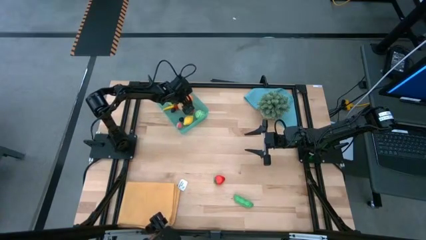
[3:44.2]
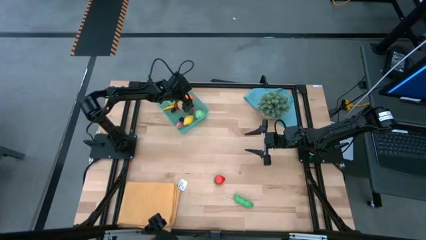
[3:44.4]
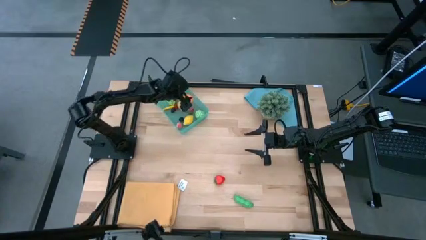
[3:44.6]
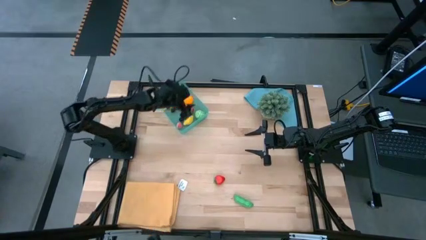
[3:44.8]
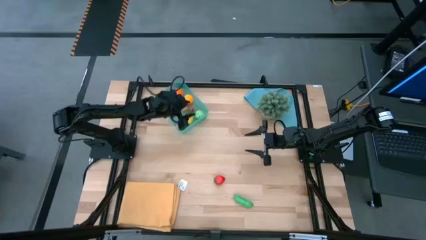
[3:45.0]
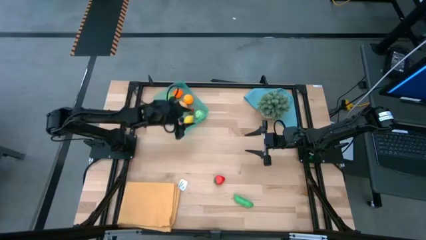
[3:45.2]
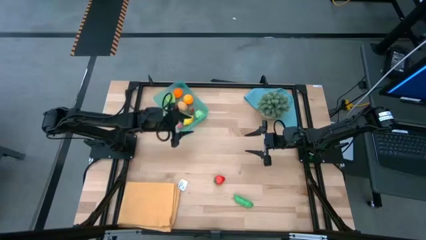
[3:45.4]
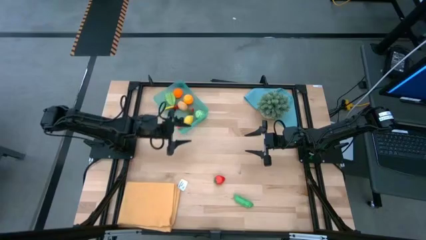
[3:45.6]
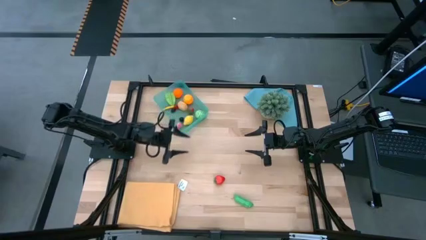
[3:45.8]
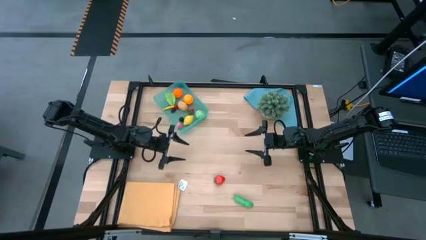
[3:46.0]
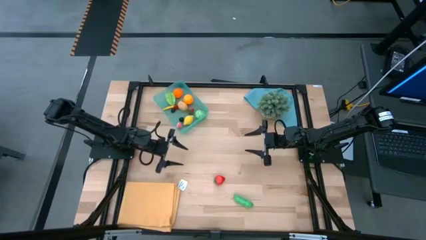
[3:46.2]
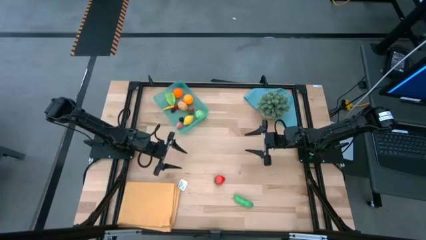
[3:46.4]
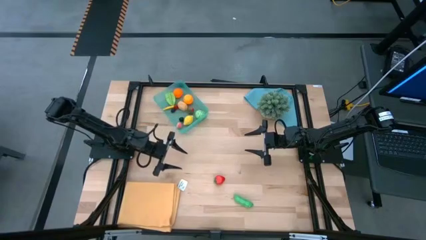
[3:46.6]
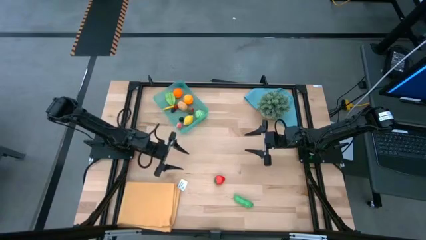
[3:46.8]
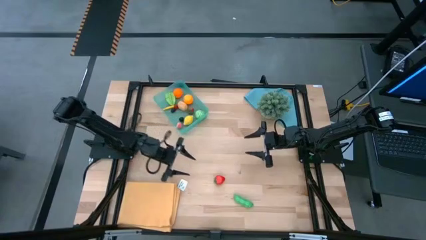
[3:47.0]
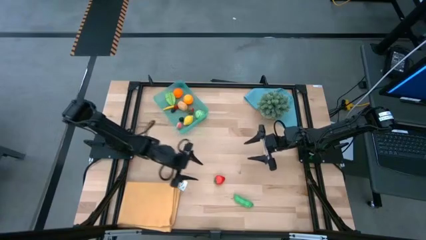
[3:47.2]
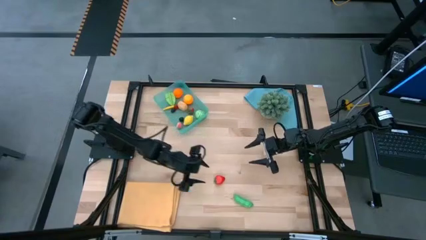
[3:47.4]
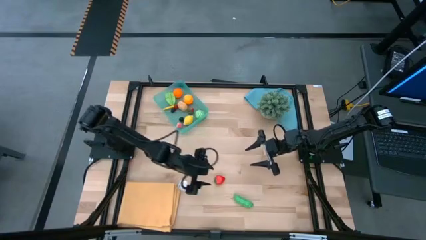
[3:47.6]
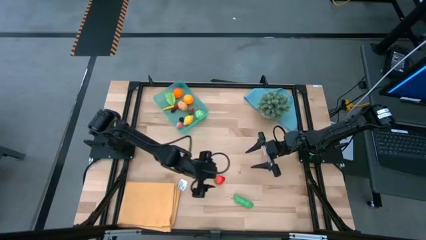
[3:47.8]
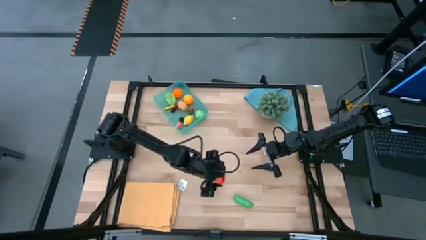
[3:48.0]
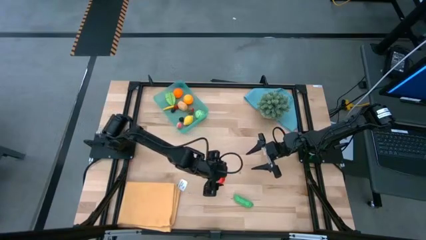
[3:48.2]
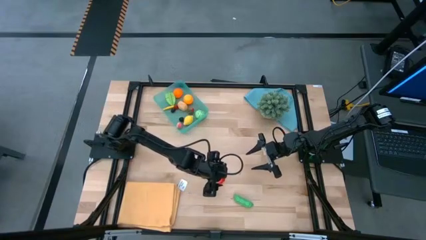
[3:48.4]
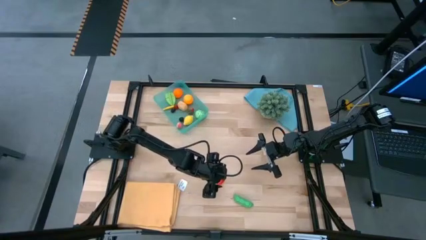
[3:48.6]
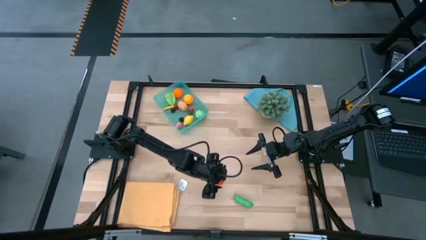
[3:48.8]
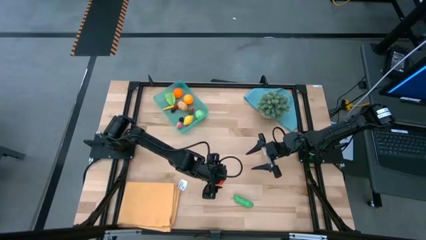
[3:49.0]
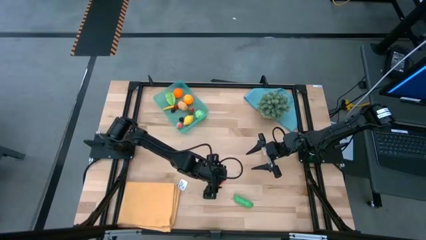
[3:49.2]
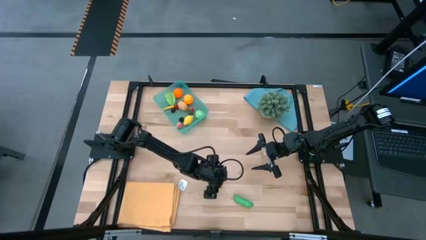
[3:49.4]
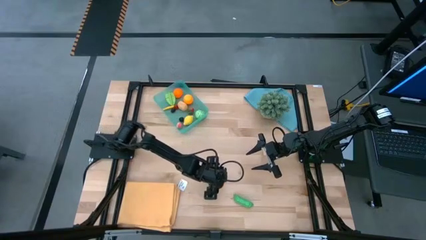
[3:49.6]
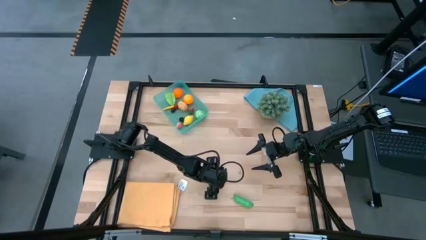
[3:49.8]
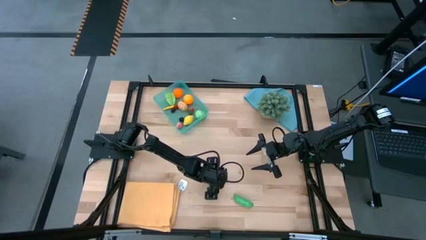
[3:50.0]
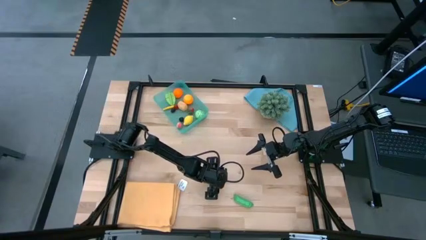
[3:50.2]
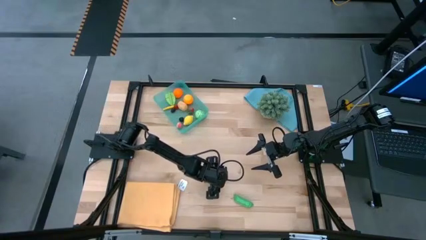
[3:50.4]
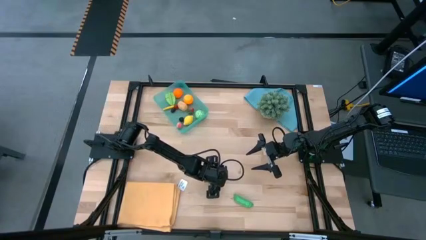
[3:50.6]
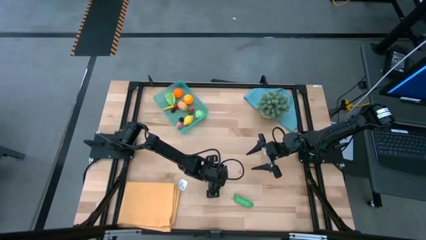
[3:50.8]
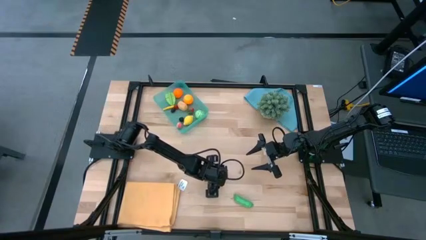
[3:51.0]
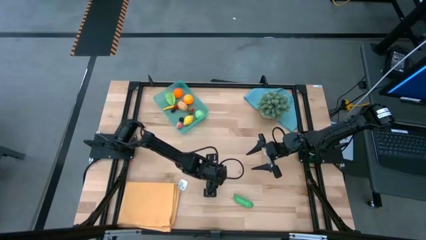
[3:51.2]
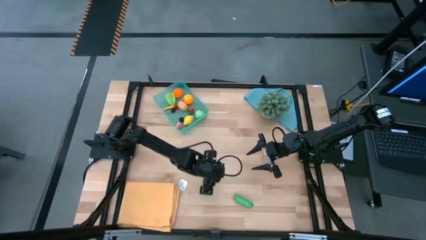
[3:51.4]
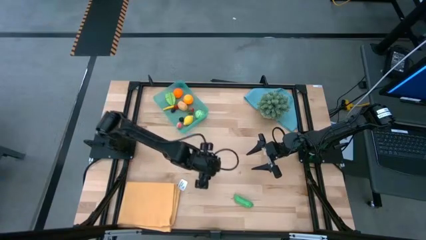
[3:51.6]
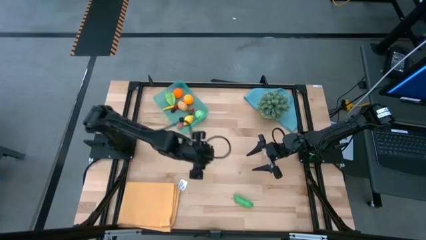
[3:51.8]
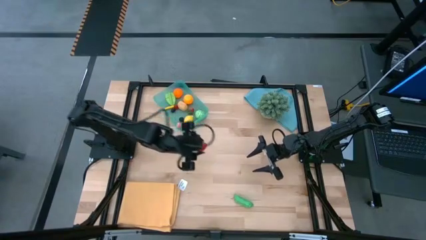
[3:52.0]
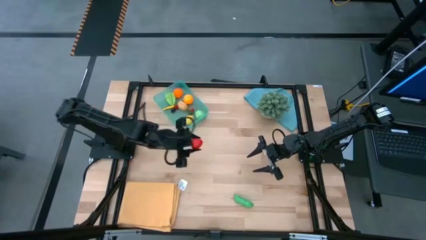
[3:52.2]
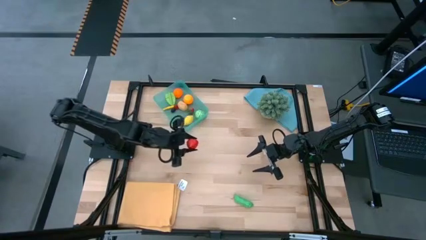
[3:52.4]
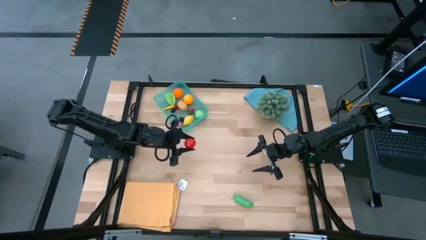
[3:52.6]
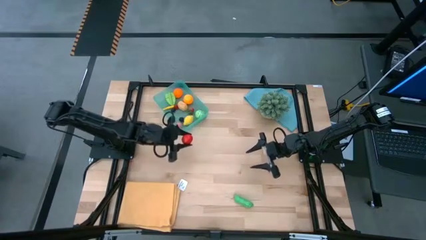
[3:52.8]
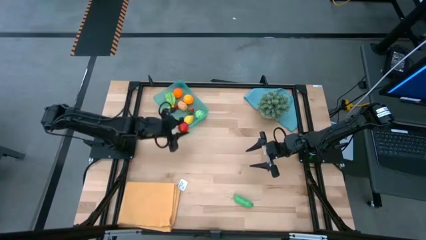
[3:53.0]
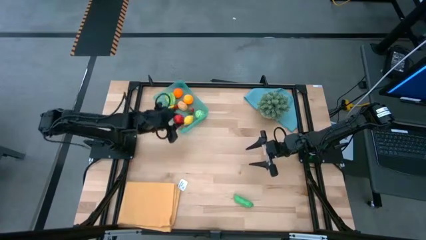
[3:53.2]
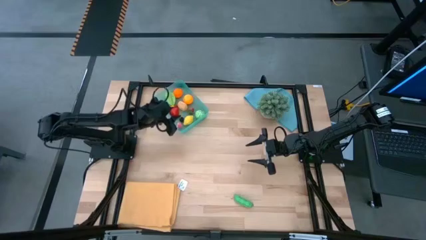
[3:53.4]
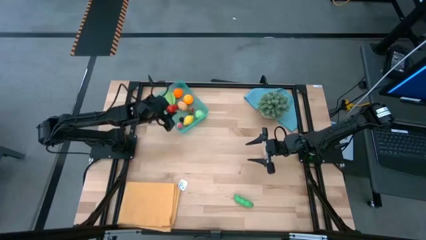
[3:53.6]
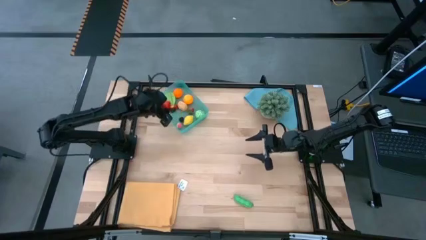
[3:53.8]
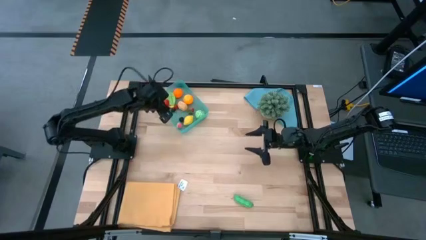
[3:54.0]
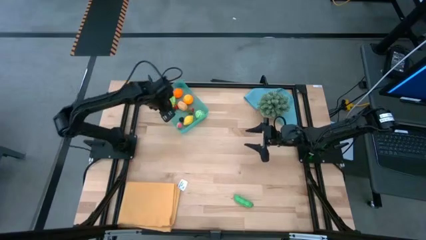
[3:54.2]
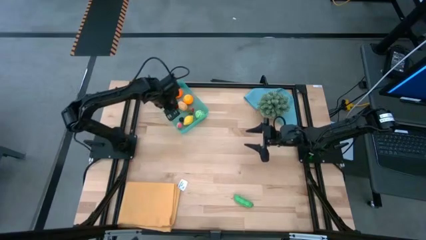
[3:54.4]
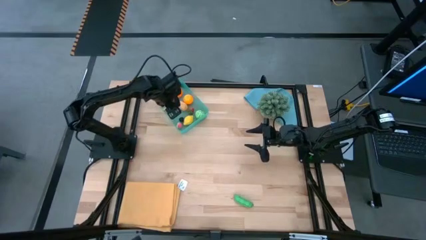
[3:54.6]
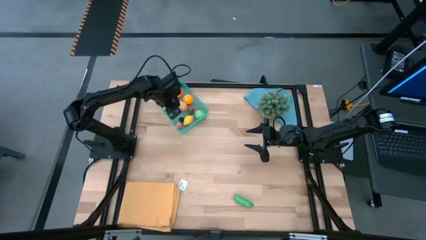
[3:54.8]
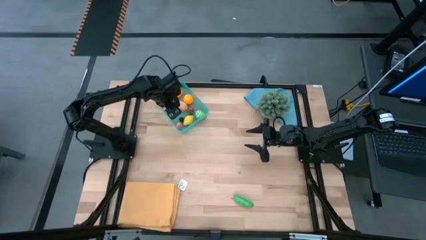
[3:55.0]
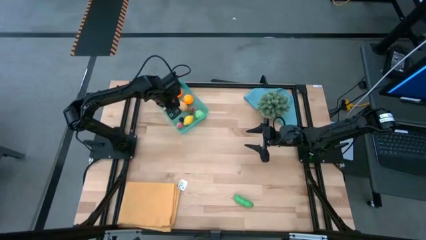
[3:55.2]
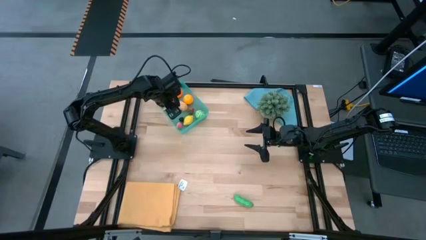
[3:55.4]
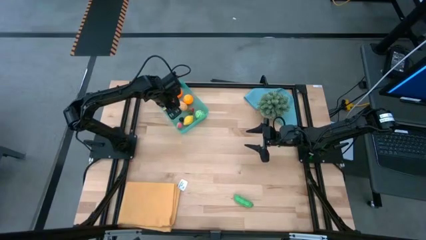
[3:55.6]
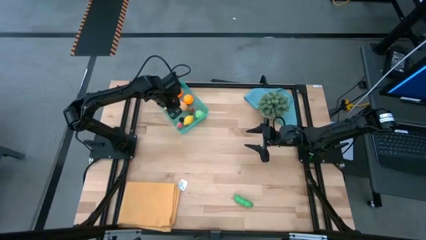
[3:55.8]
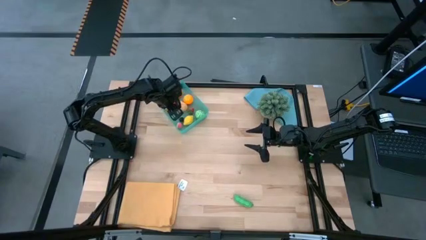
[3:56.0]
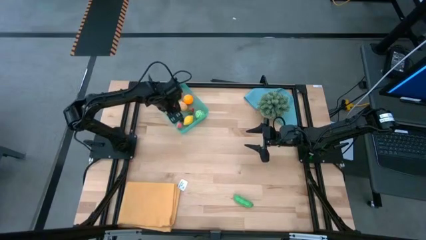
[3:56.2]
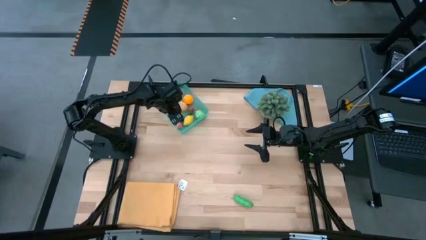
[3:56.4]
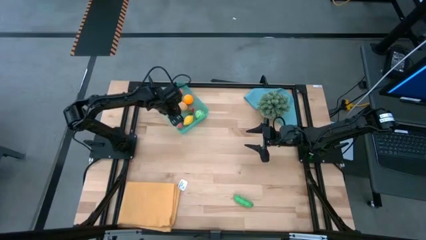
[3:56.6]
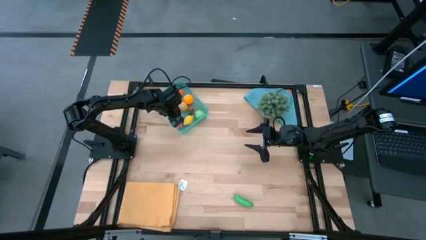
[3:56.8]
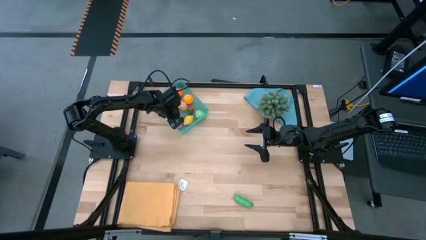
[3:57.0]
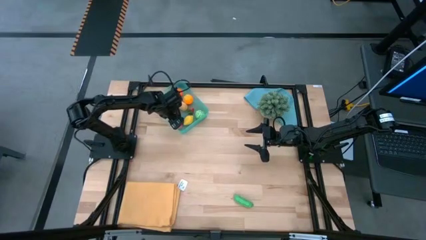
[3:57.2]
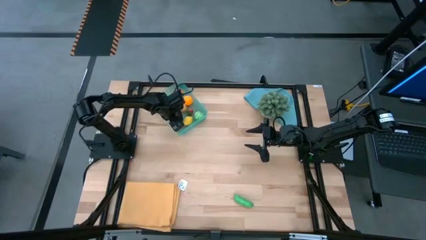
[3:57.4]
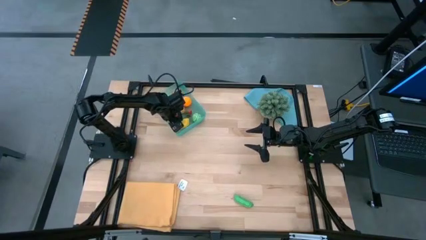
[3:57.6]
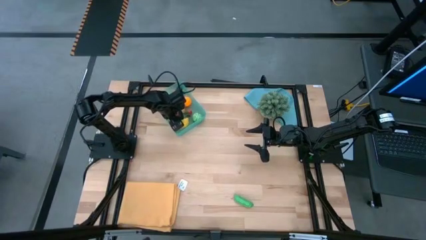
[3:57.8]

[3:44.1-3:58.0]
Task: Pick and placing Produce into tupperware
Put the red strawberry into the blue bin

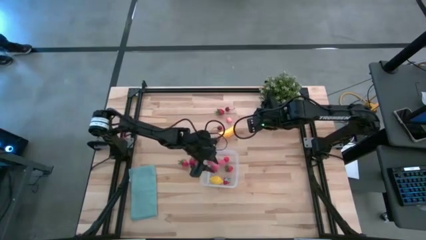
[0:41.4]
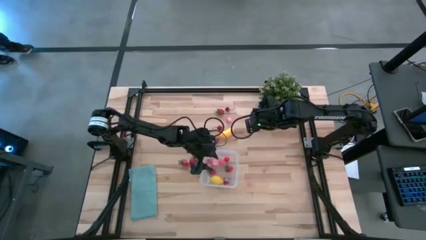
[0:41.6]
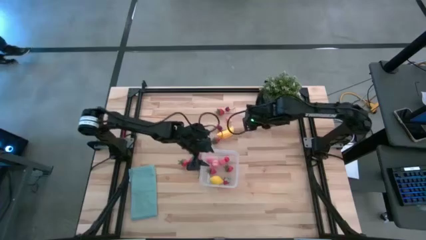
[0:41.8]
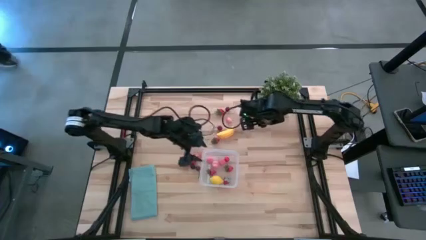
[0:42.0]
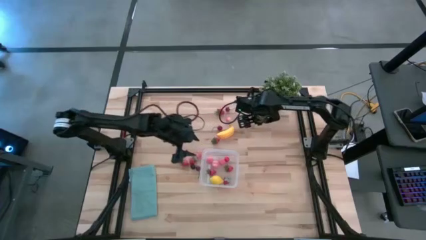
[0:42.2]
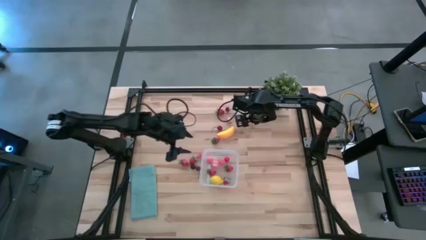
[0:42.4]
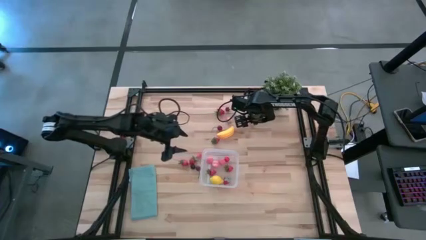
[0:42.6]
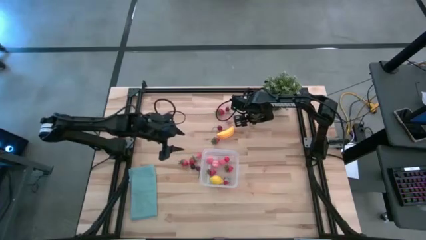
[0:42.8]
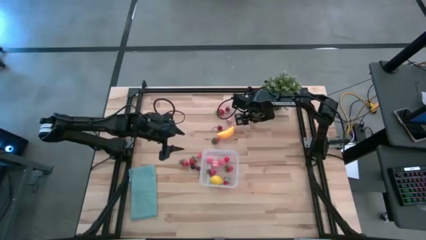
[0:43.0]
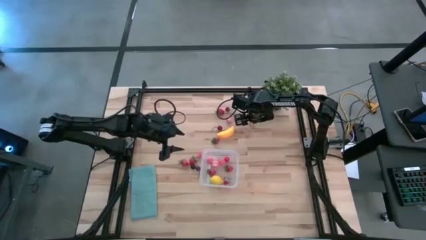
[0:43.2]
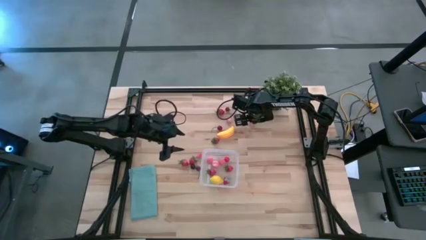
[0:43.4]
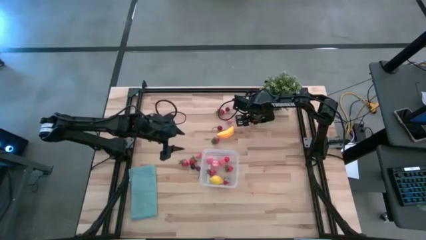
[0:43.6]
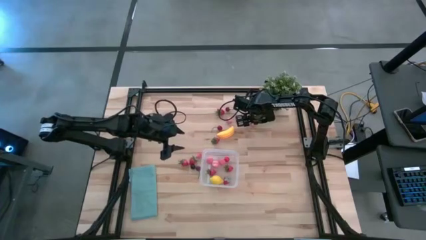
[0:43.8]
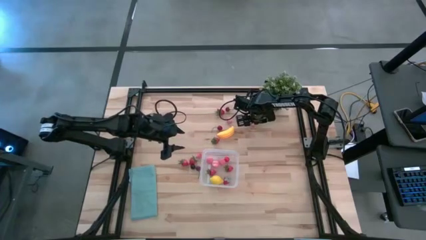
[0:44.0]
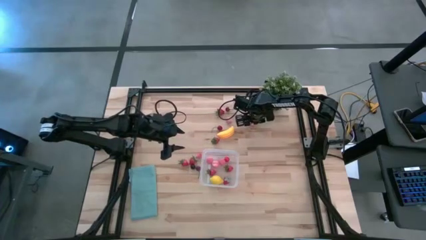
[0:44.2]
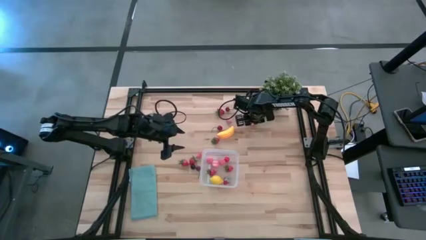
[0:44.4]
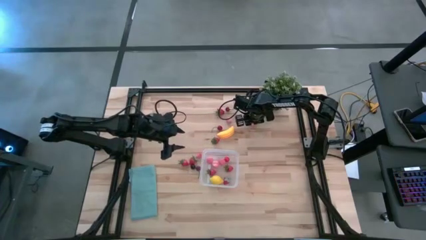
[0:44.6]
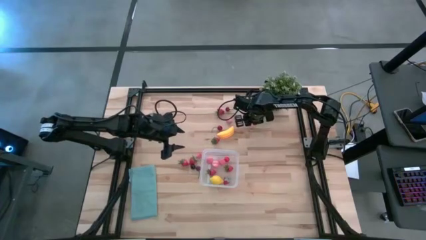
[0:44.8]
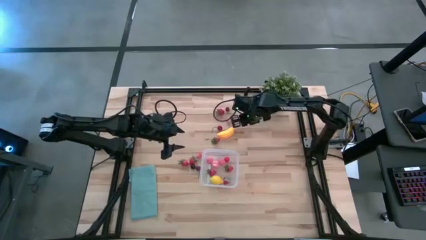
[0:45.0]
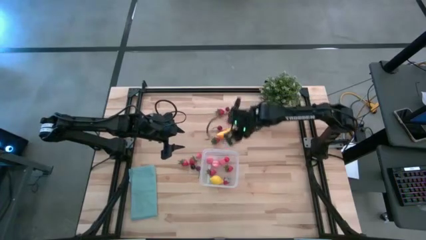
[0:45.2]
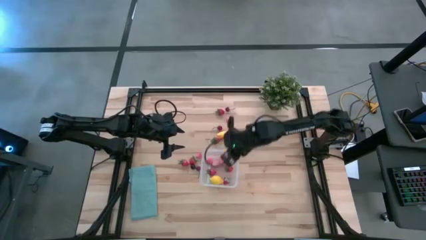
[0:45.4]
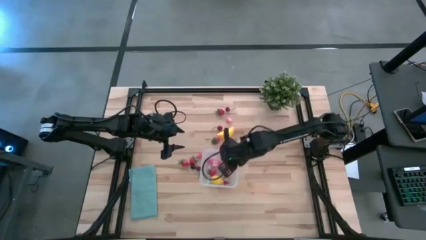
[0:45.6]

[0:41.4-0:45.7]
Task: Pick and placing Produce into tupperware
Put the pink peach into the transparent container
